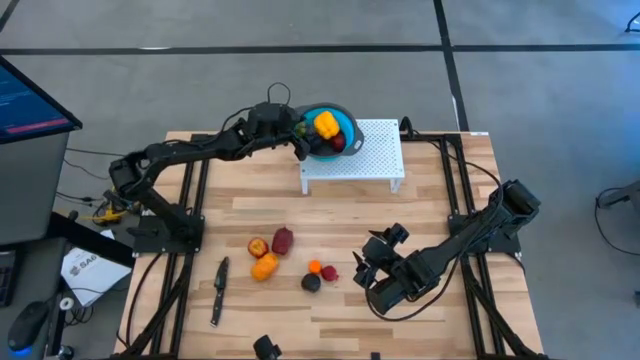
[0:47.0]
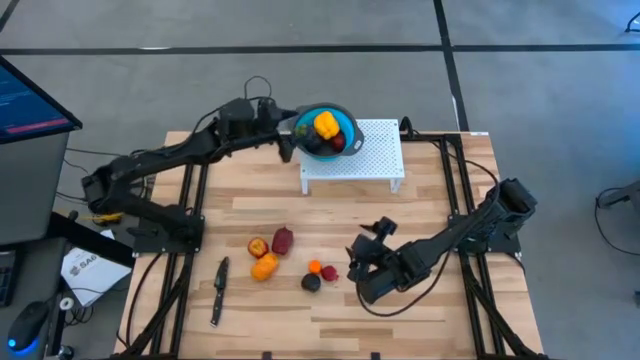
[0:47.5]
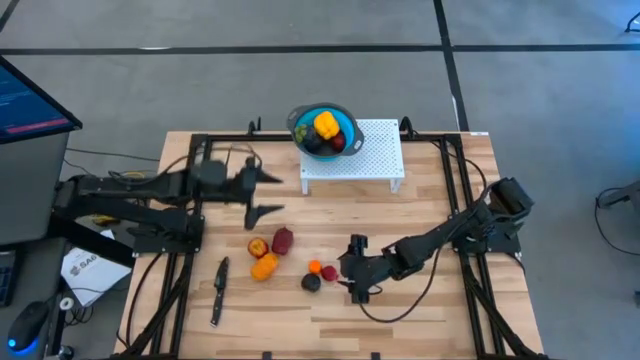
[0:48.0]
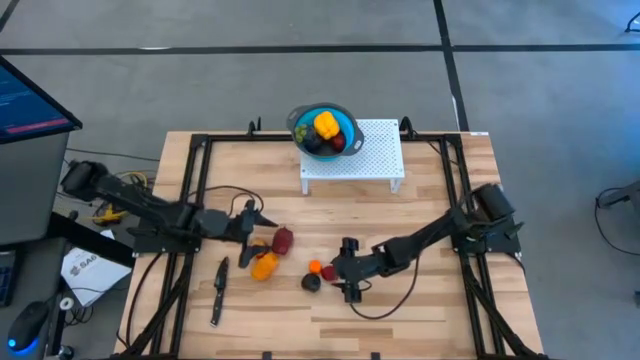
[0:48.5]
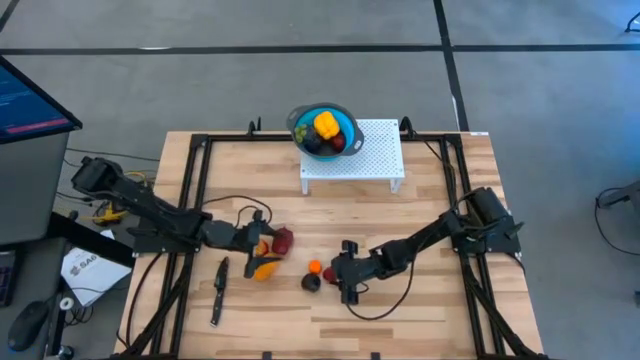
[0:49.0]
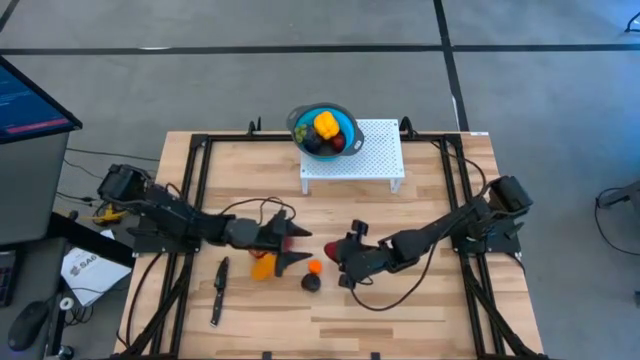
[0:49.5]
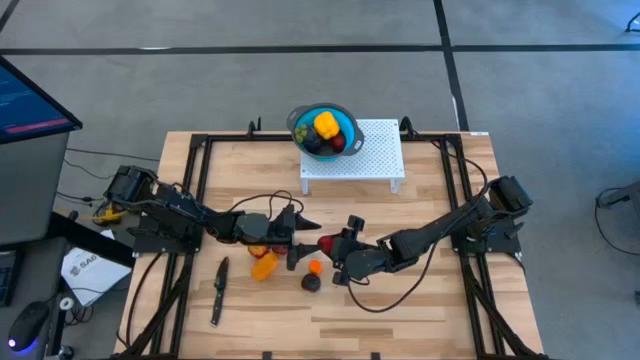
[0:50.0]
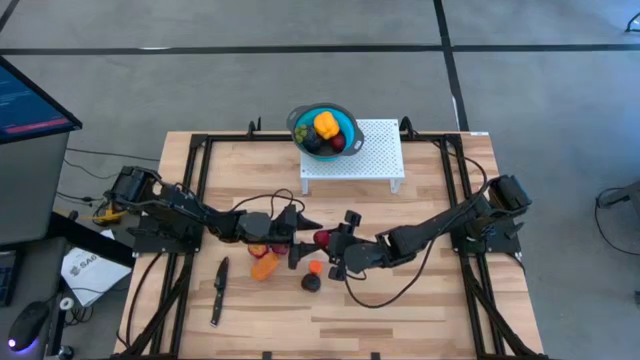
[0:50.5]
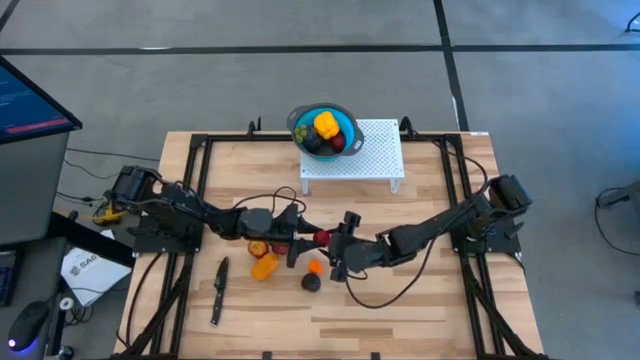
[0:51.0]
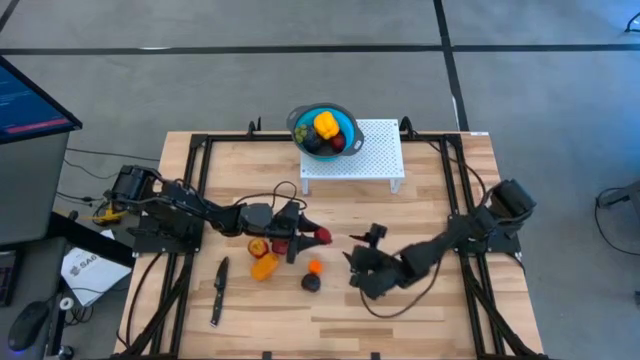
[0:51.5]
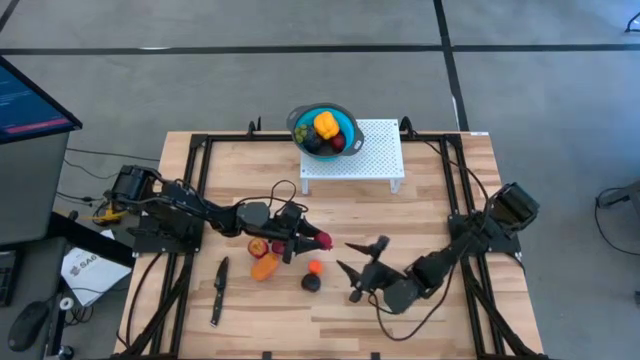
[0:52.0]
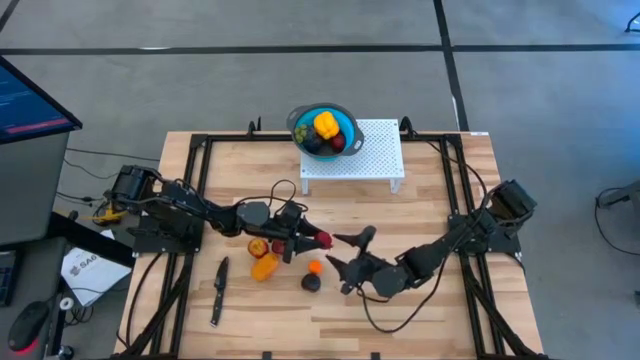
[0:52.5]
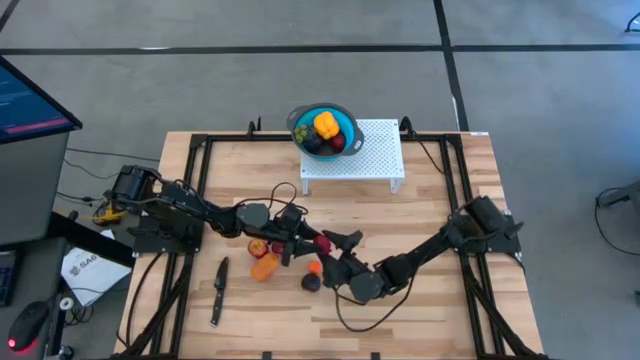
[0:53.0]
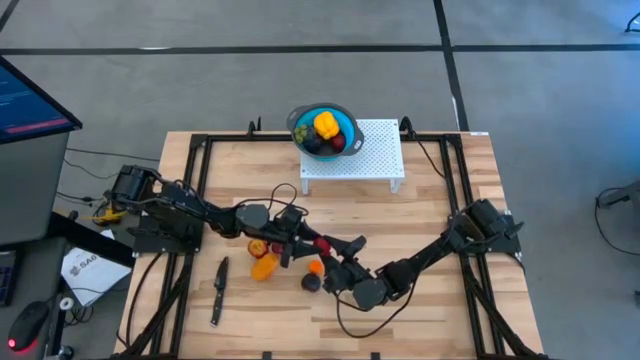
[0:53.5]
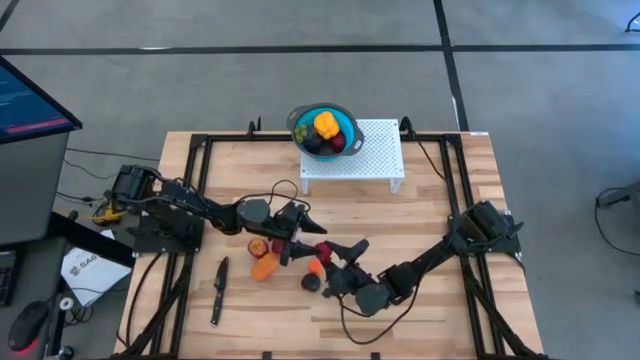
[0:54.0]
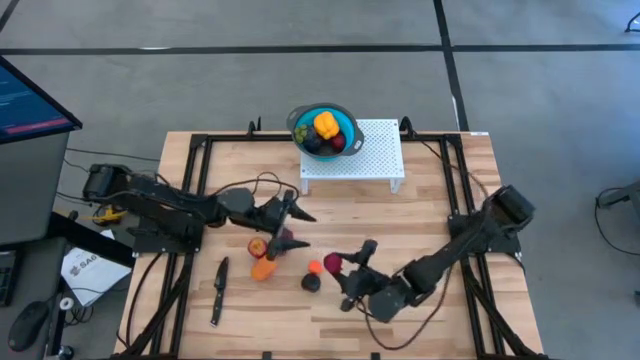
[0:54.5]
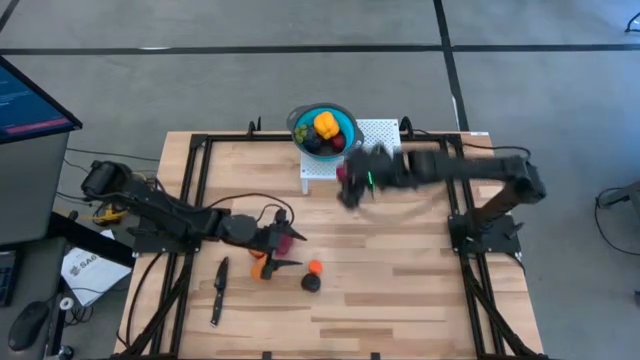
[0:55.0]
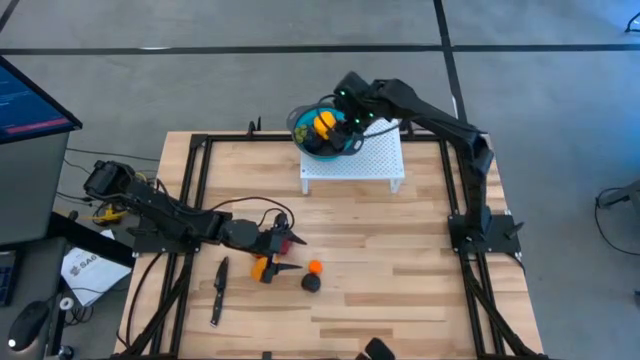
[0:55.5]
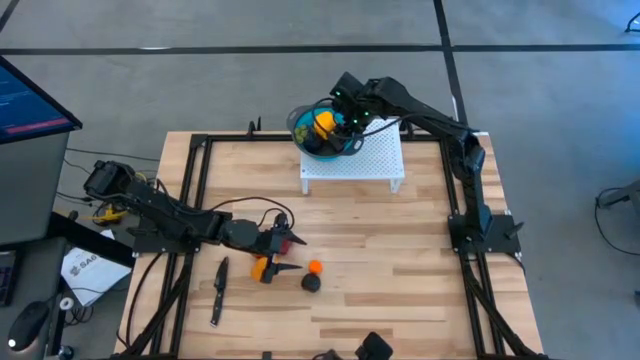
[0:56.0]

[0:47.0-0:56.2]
Task: Pick & Place Fruit
Put the red pomegranate into the blue strainer bowl on the shelf

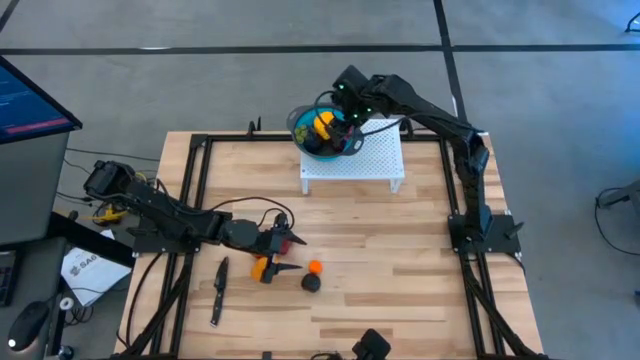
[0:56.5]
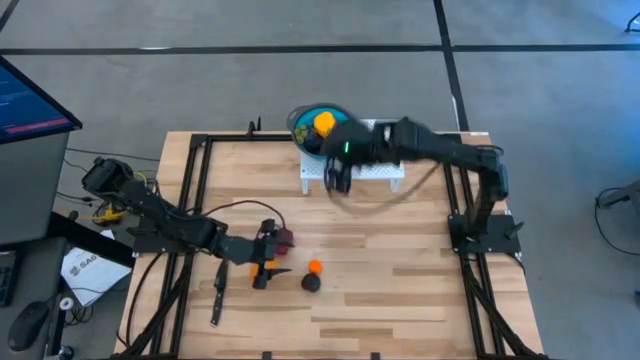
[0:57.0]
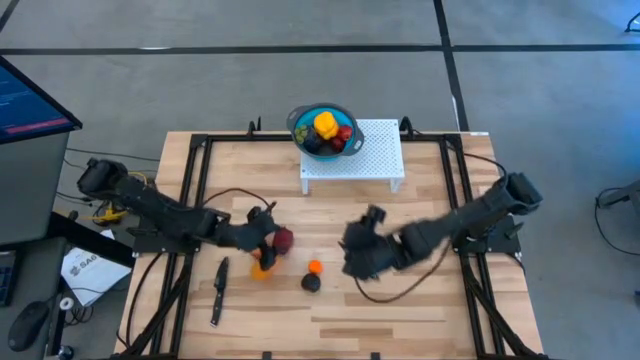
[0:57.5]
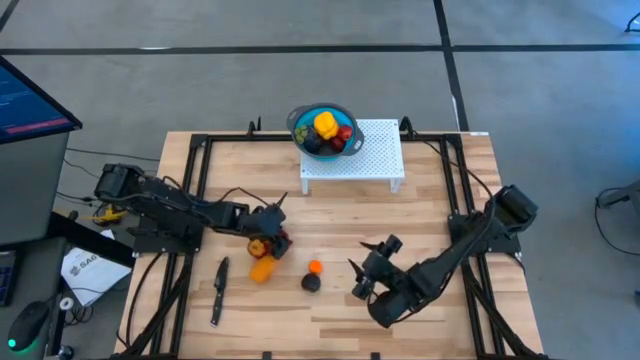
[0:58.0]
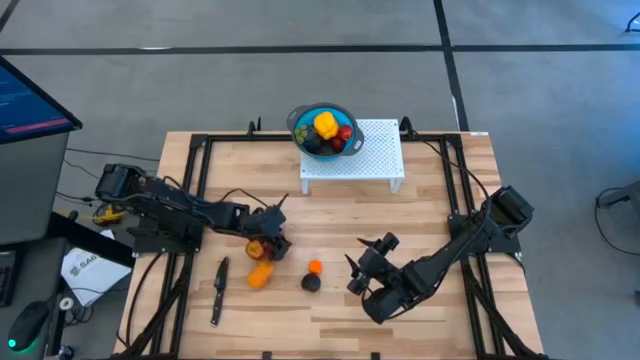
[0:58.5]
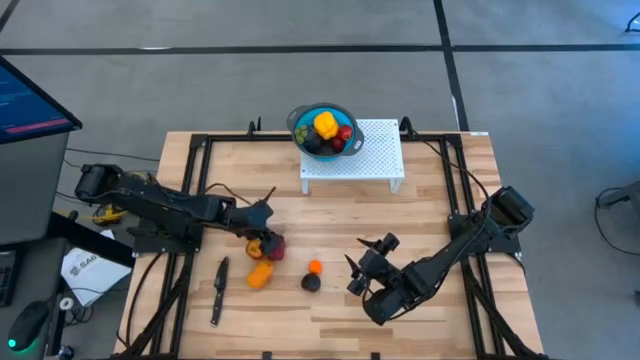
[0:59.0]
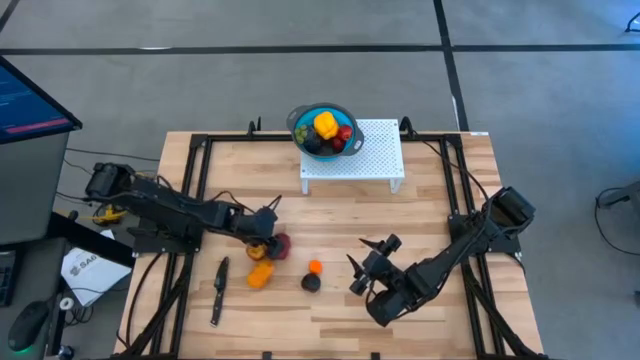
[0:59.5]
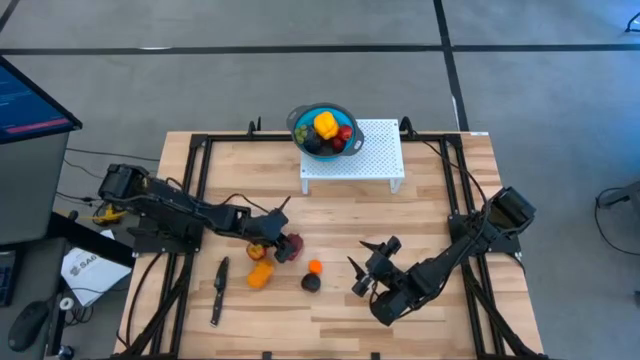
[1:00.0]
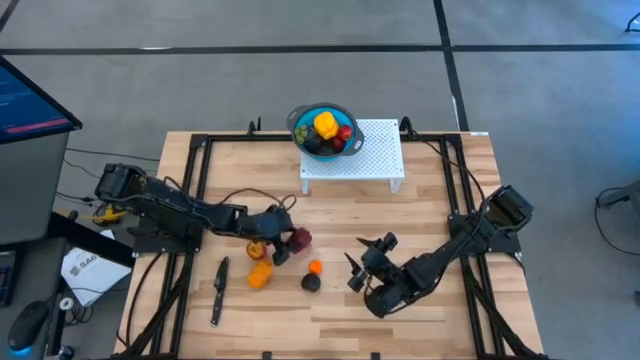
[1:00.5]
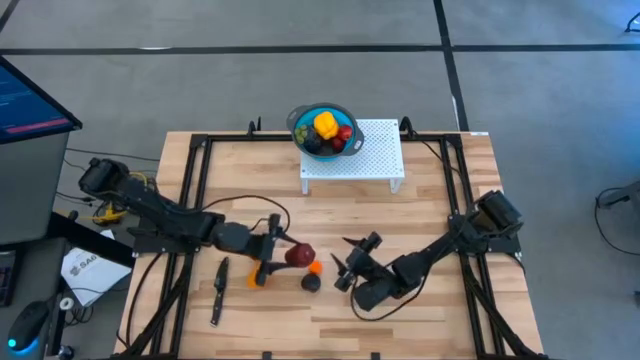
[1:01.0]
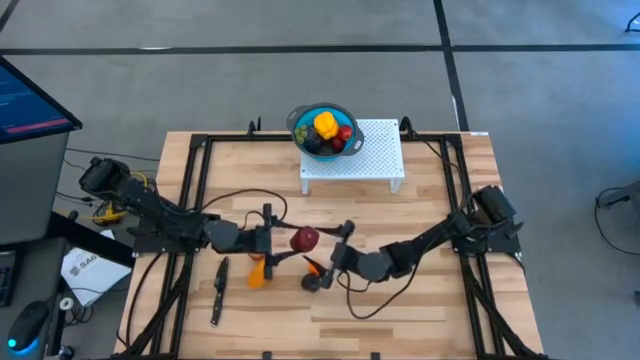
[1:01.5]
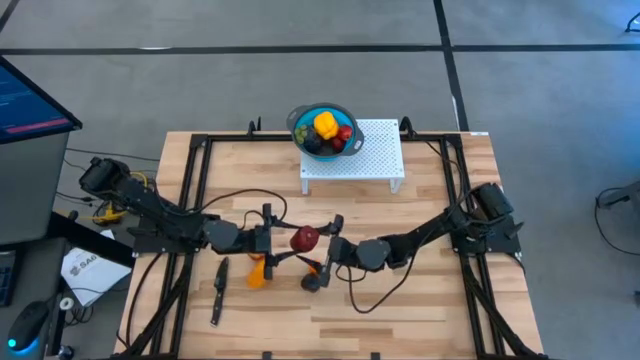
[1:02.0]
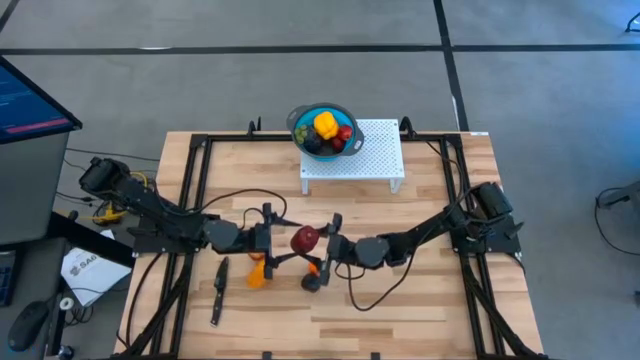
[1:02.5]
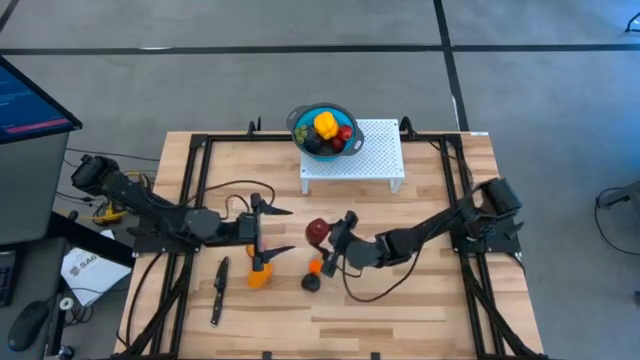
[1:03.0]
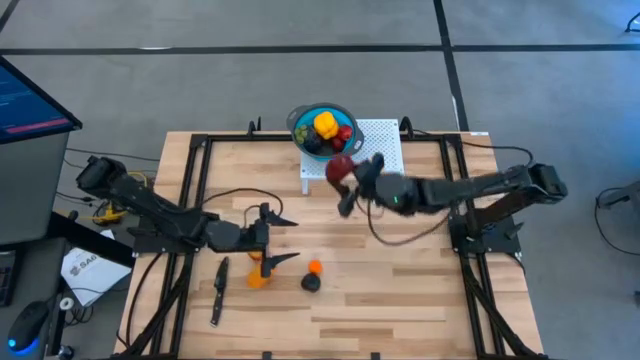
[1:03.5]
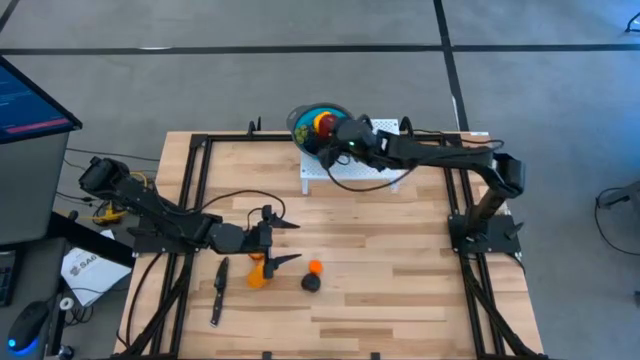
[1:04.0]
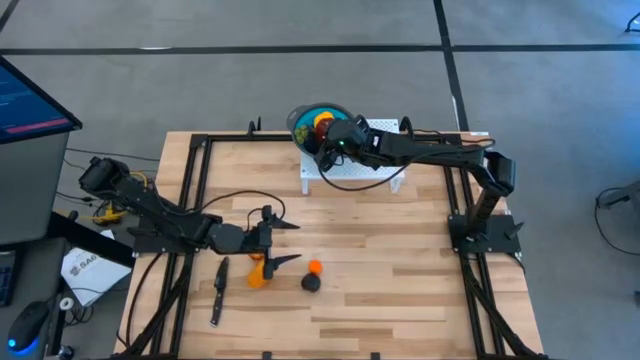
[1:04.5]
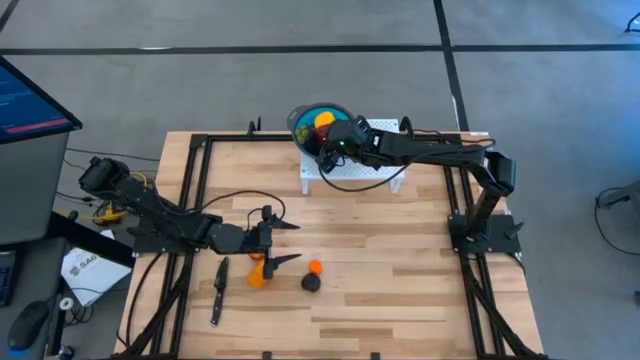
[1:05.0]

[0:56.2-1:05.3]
Put the right red apple into the blue strainer bowl on the shelf

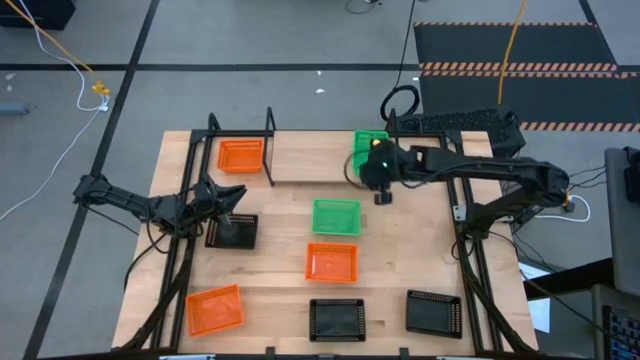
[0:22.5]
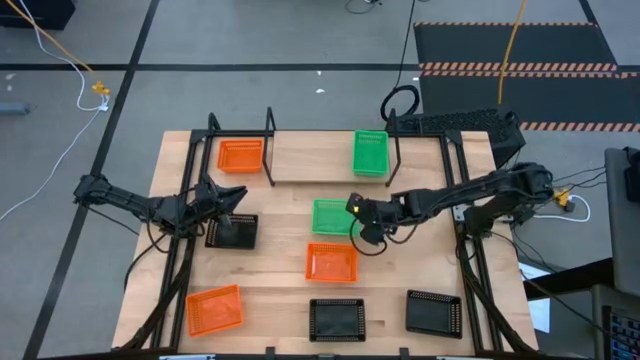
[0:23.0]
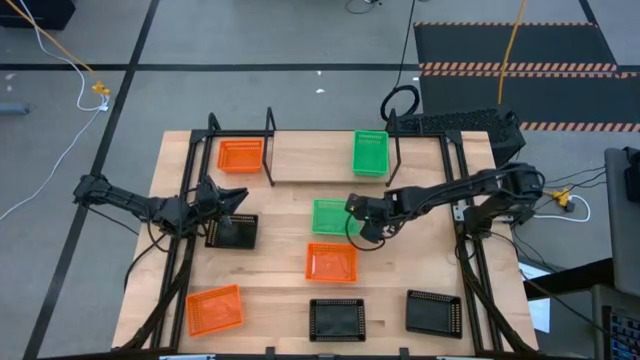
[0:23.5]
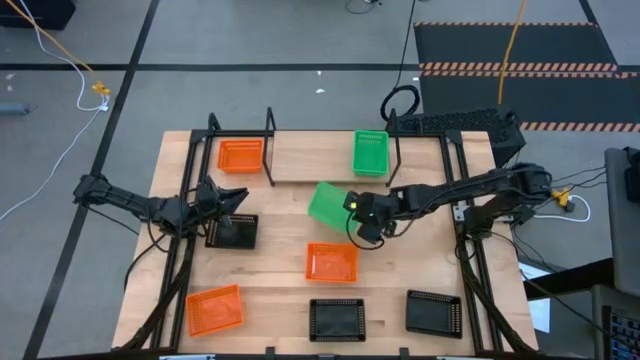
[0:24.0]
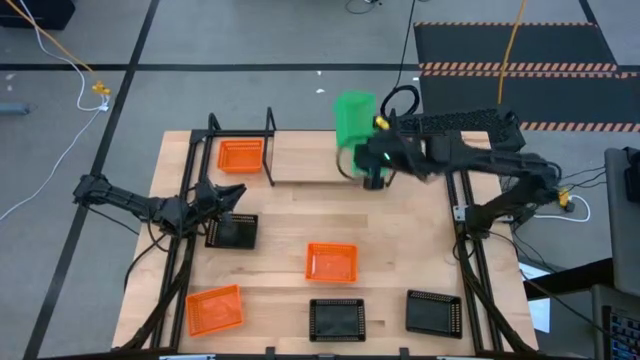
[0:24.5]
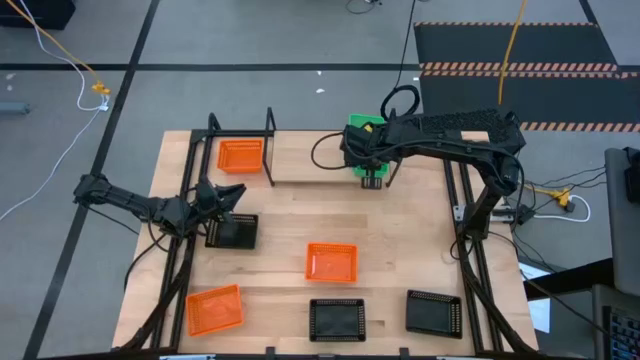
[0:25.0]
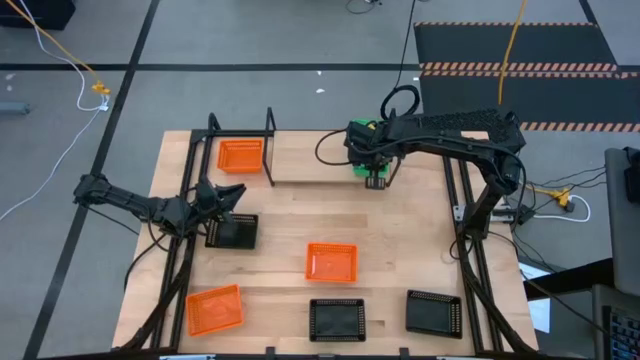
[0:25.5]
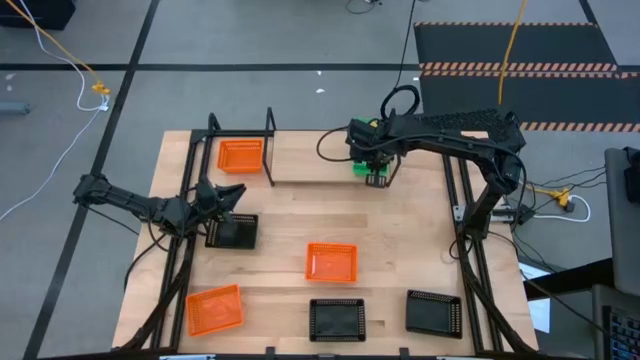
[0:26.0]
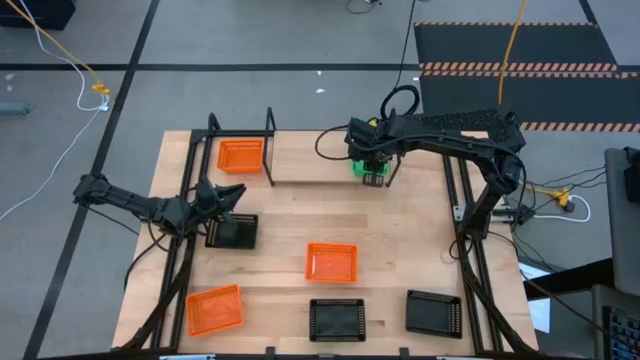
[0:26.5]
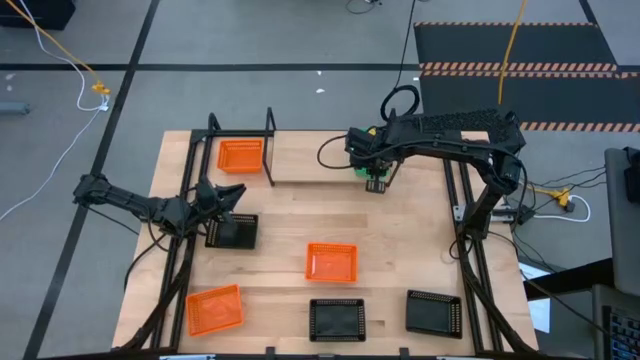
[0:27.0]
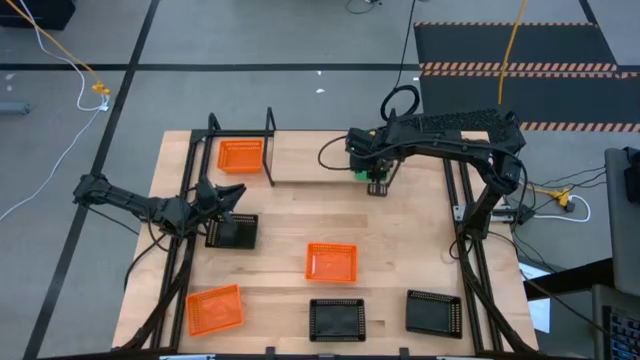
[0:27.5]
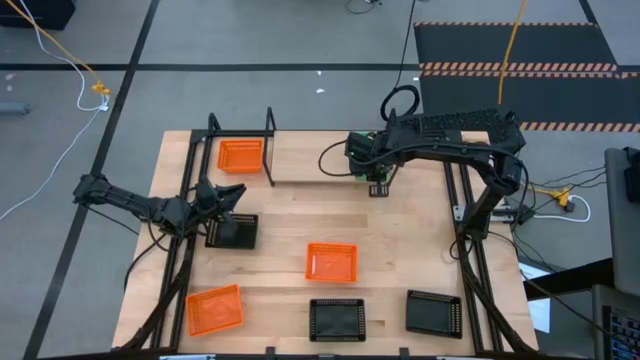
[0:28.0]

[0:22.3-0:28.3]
Task: Stack baskets on shelf by color
Stack the green bin on top of the green bins on the shelf
